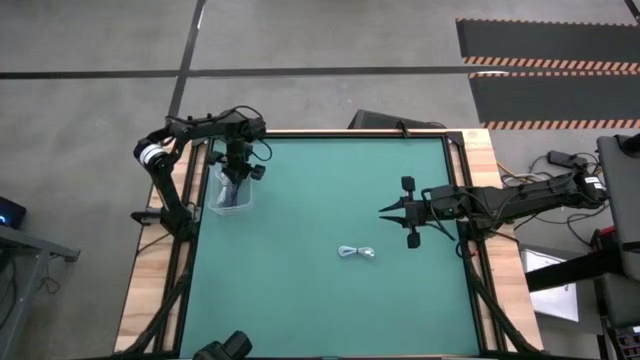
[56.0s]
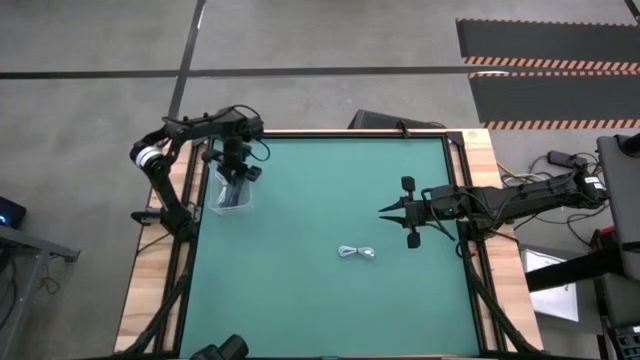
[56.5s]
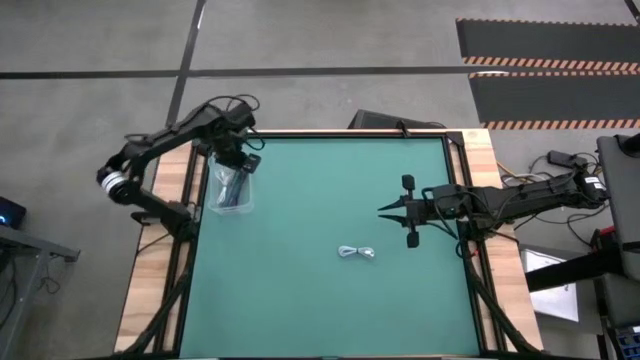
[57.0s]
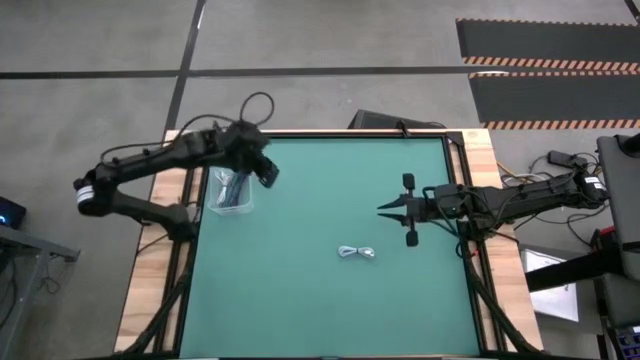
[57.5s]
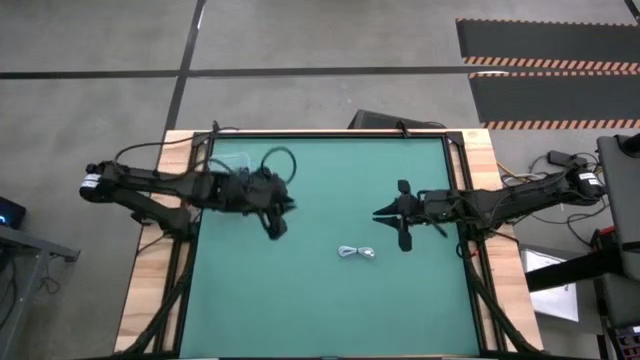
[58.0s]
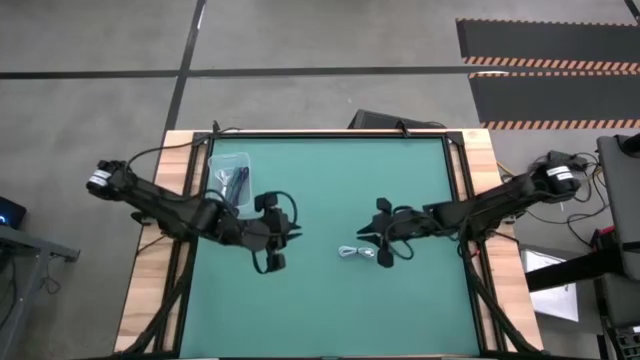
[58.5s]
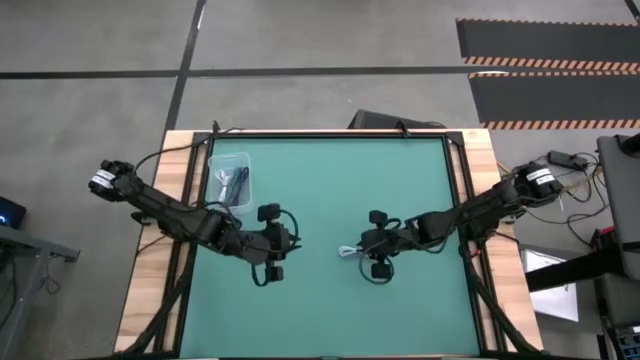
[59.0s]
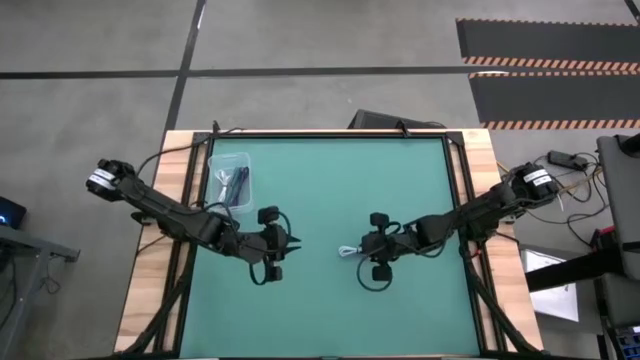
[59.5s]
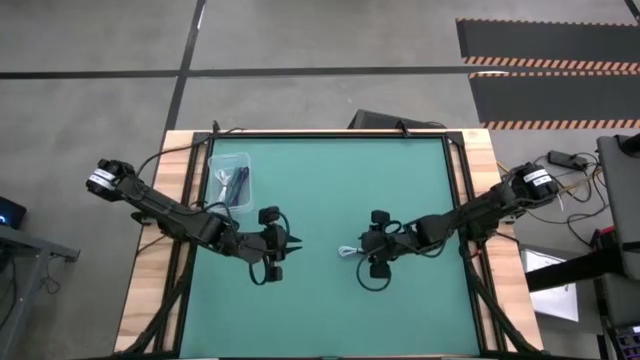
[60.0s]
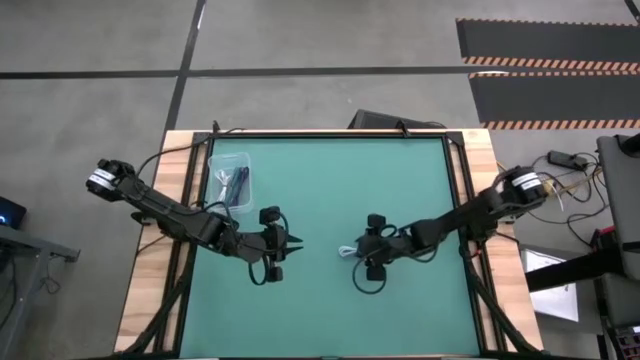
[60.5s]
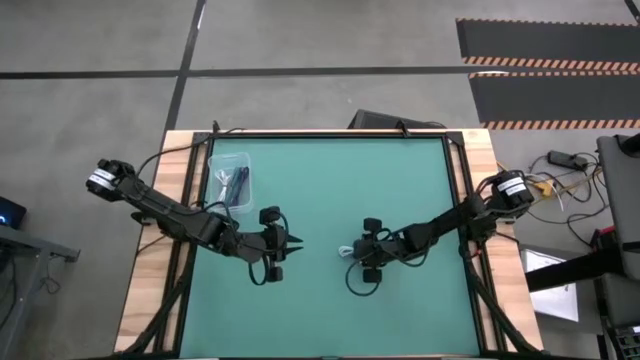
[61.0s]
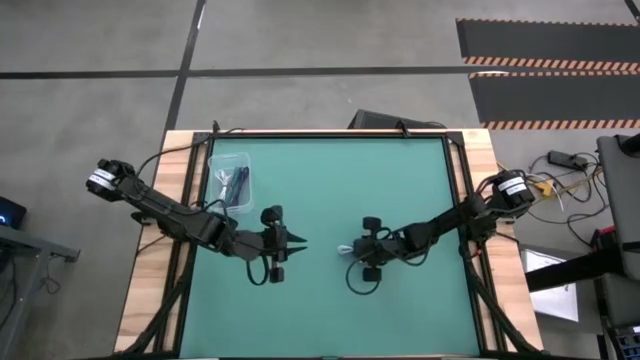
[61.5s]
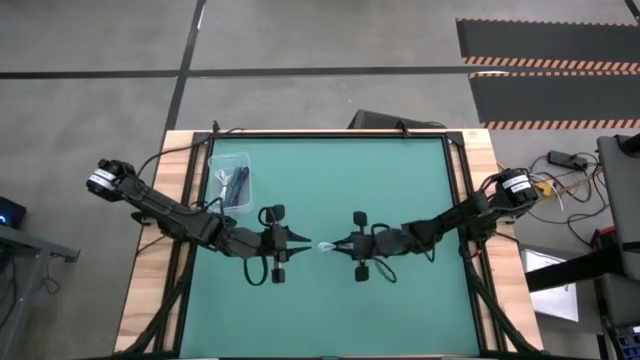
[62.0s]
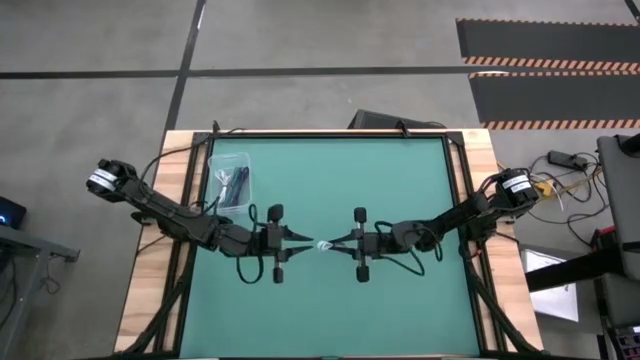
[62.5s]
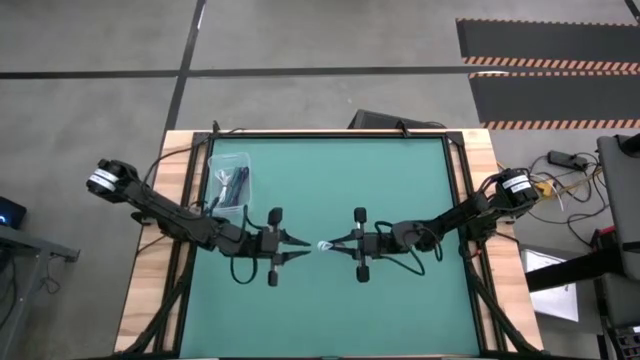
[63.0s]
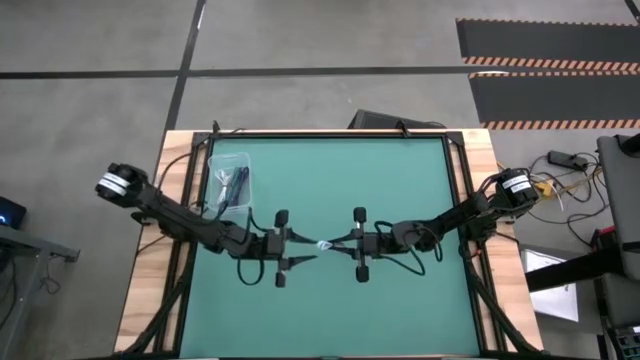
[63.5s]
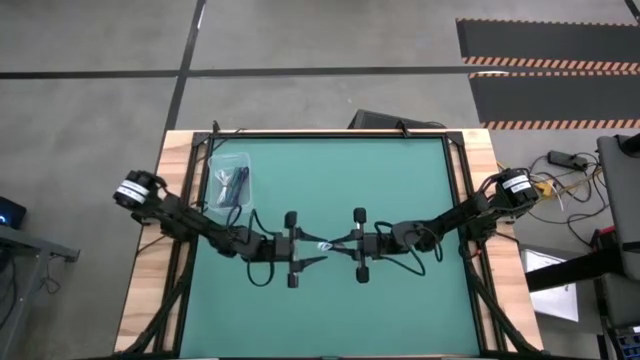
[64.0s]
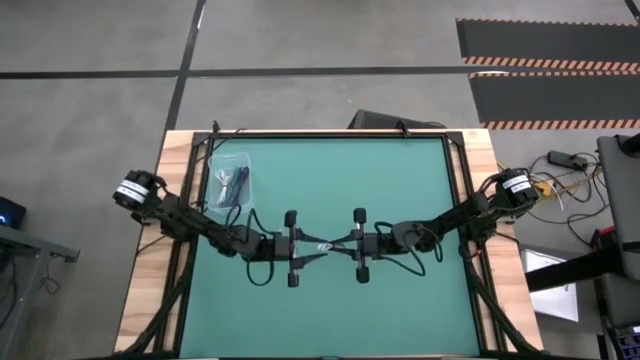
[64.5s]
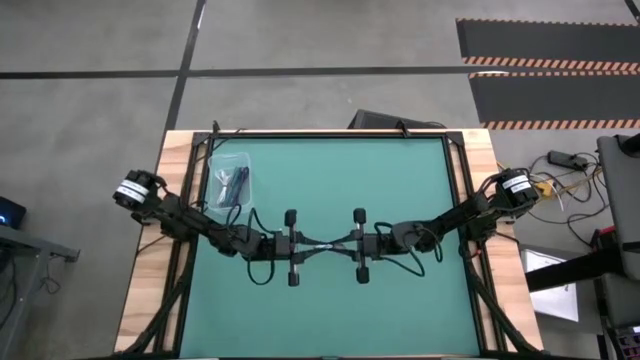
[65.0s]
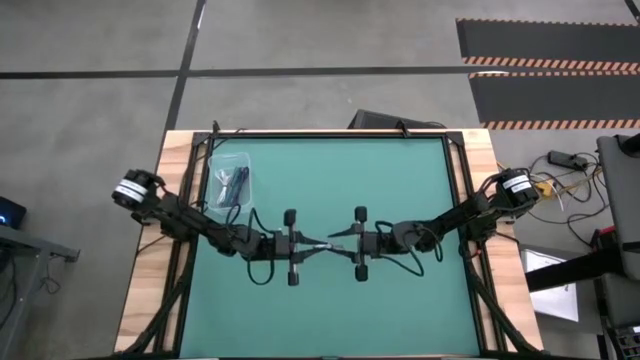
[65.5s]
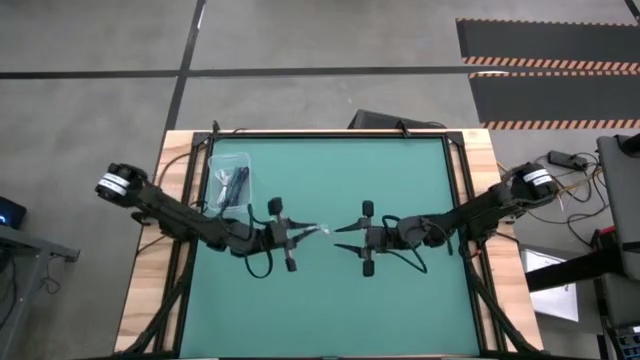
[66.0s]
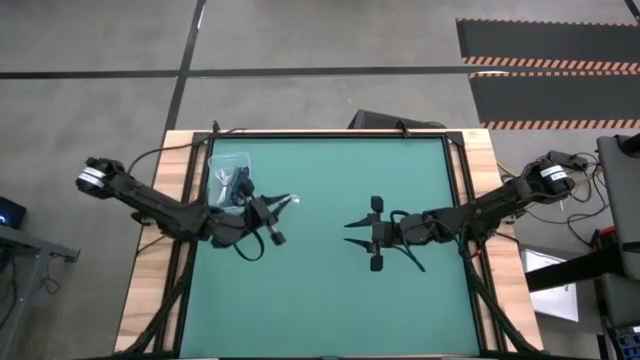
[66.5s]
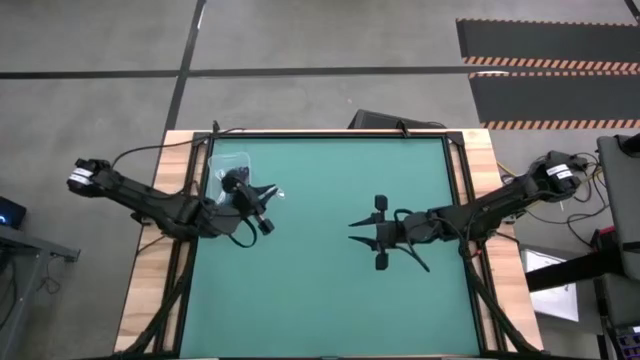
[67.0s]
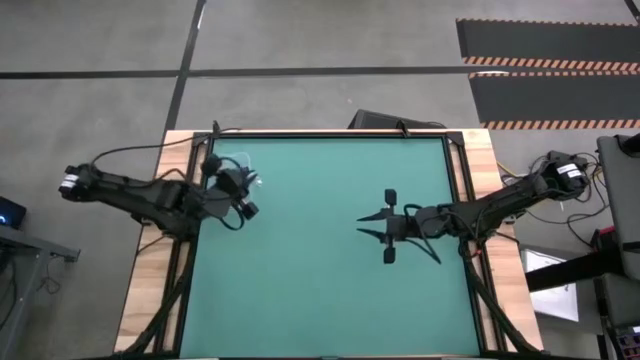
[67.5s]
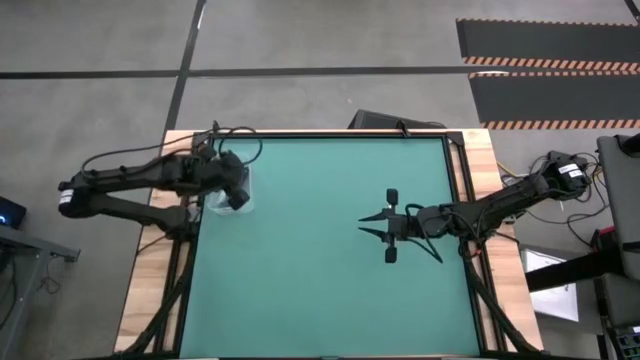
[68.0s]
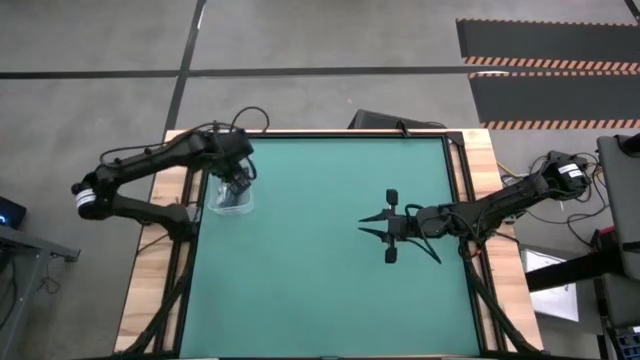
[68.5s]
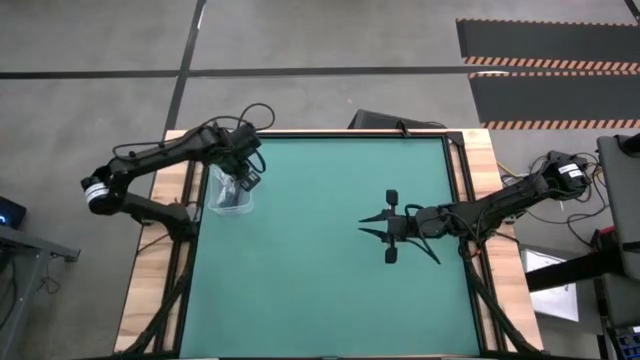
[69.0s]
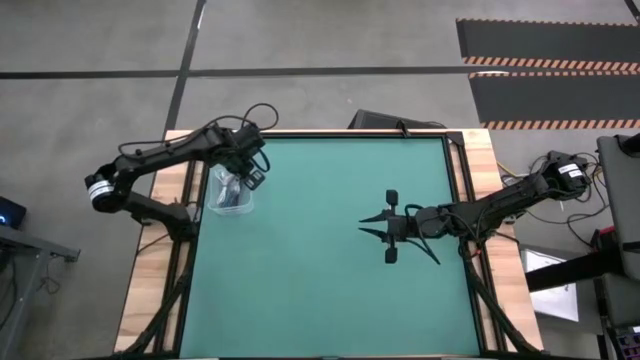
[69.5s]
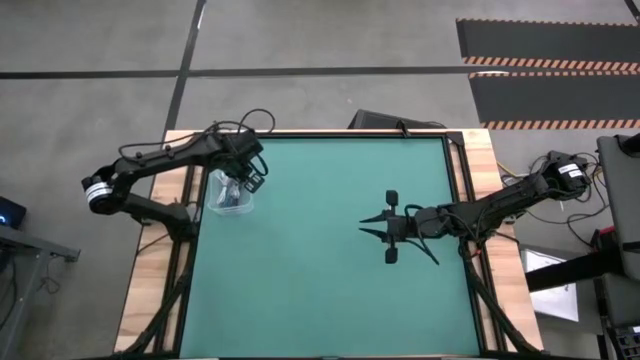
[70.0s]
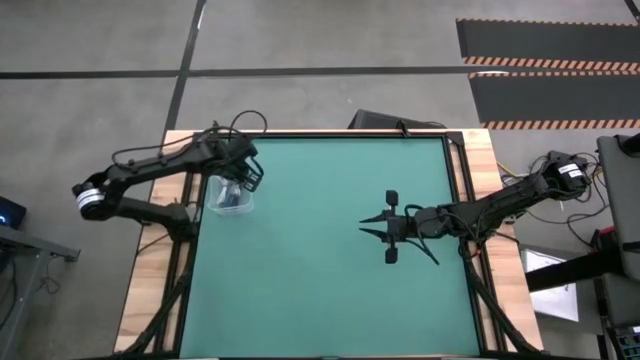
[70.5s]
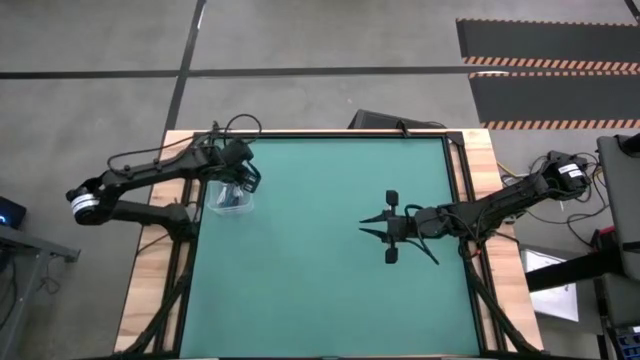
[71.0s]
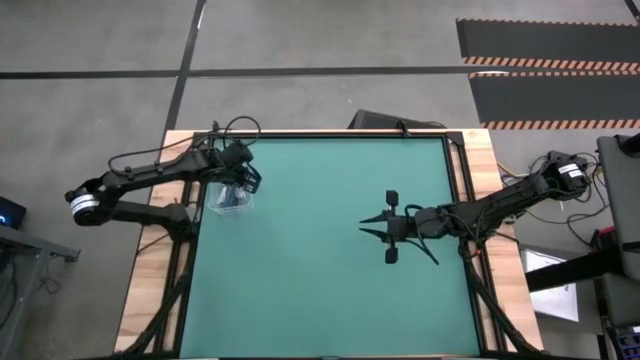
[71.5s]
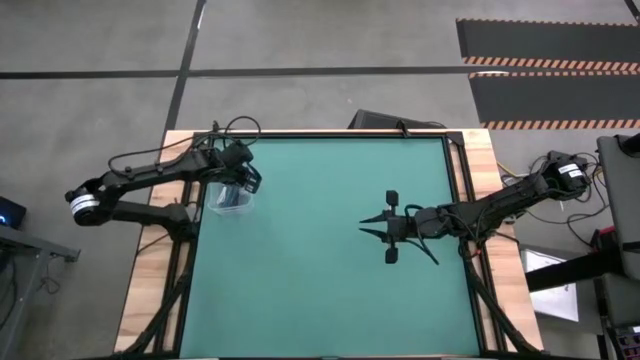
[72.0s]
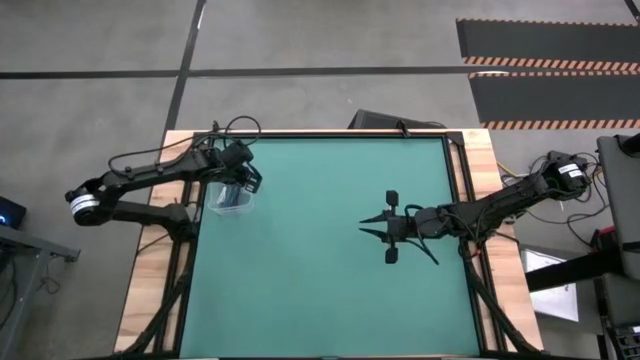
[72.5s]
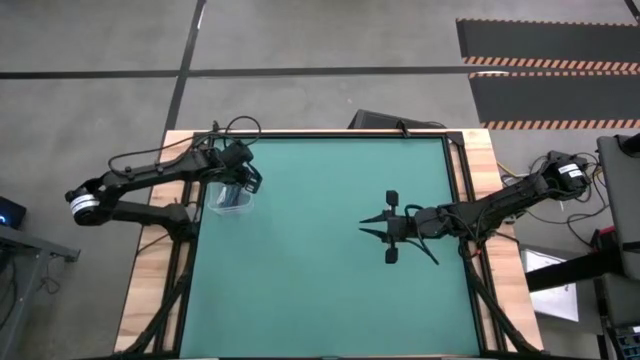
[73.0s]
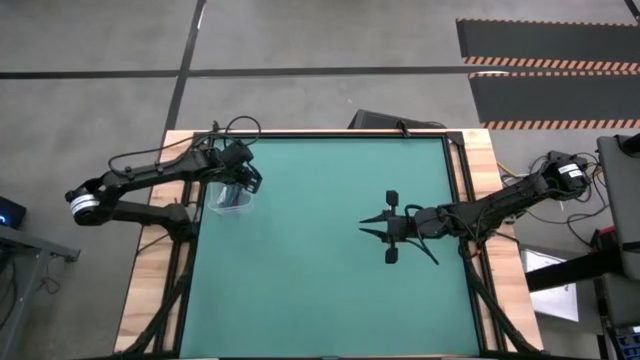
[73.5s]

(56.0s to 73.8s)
Task: Pick and place USB-C Cables
Put the light blue charger cable into the transparent bin

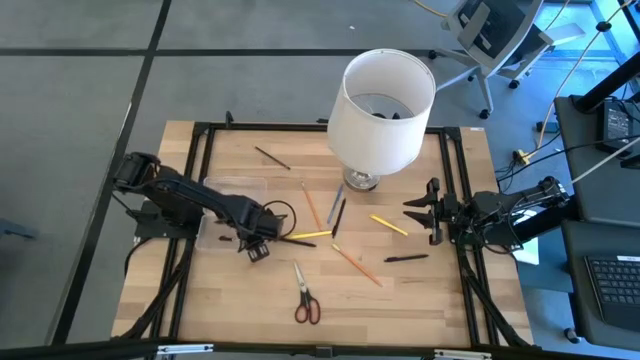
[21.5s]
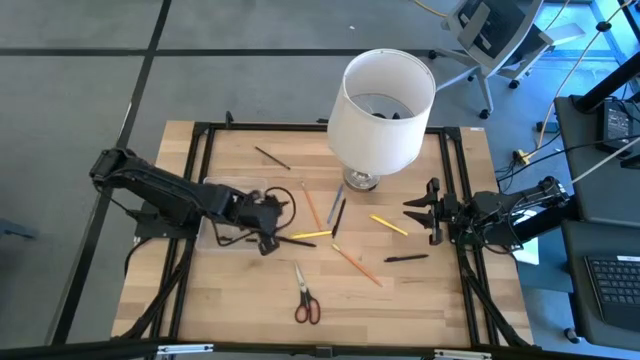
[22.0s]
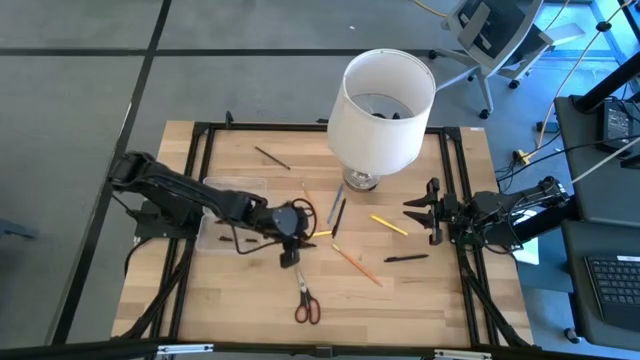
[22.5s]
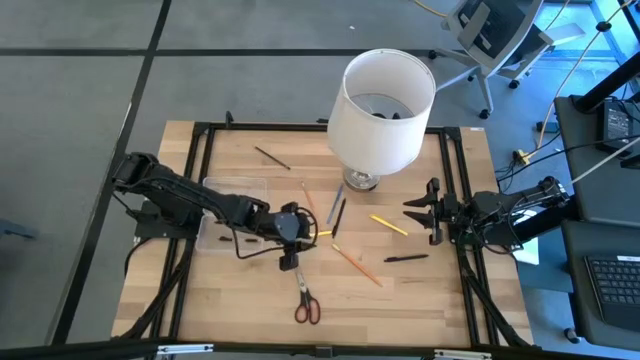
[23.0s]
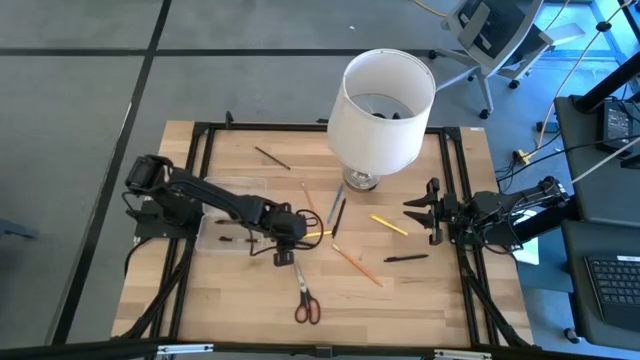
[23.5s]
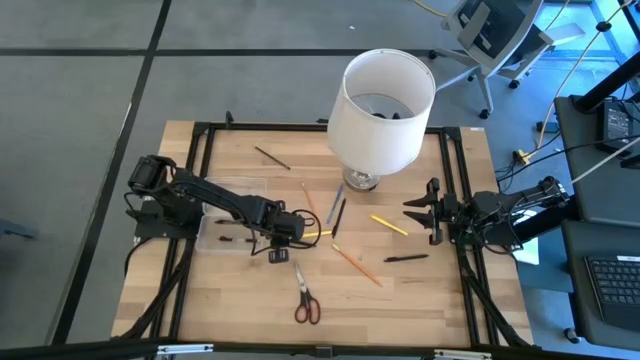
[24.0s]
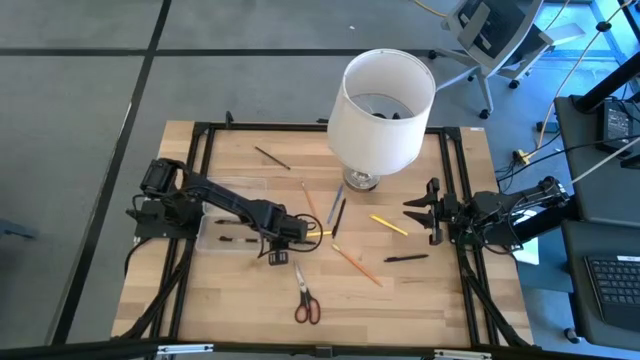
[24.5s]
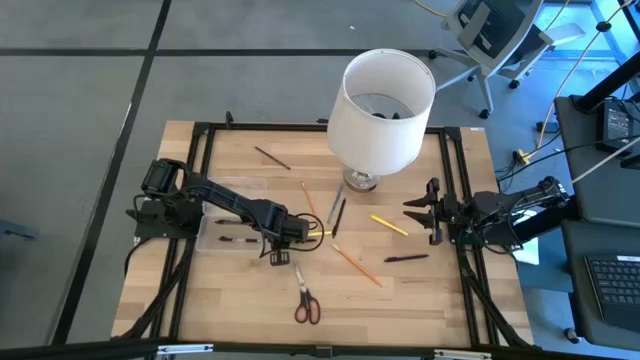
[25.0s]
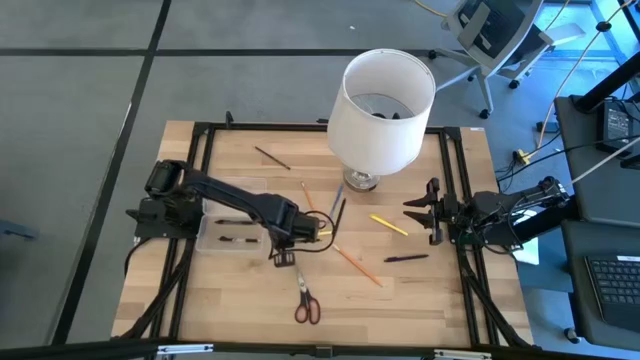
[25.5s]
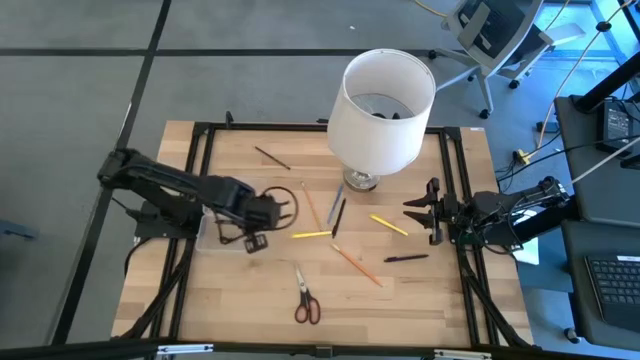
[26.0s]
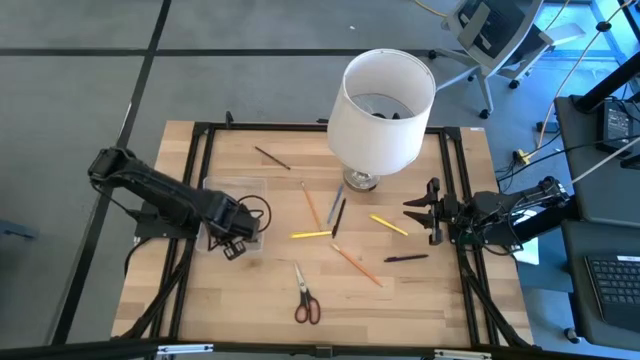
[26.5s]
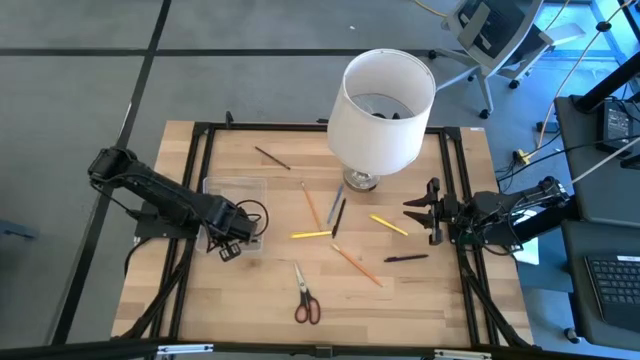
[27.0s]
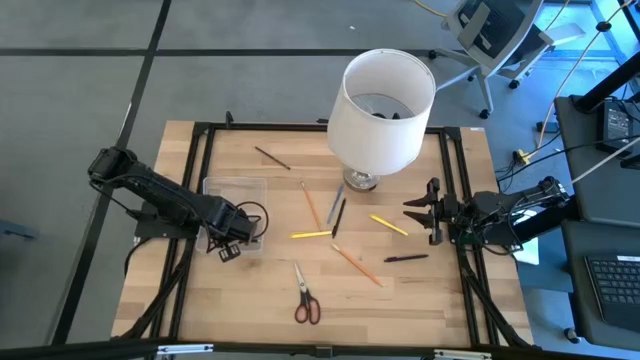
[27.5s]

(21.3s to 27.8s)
Task: Pick & place school supplies into a supply box
Put the black pen into the transparent supply box
